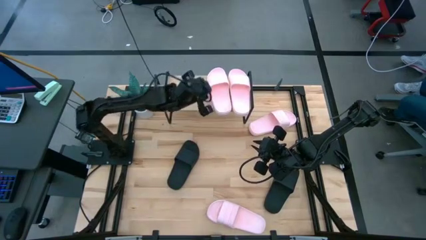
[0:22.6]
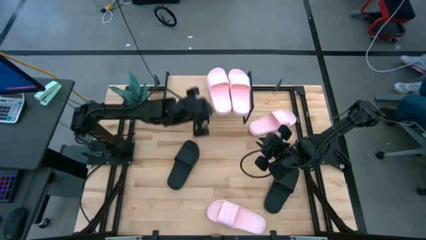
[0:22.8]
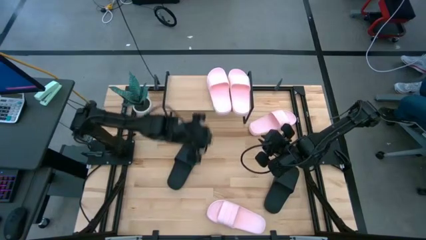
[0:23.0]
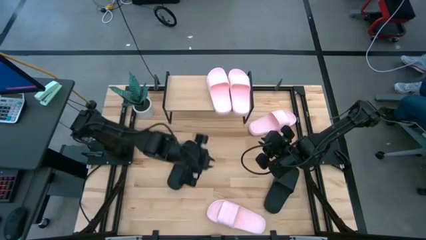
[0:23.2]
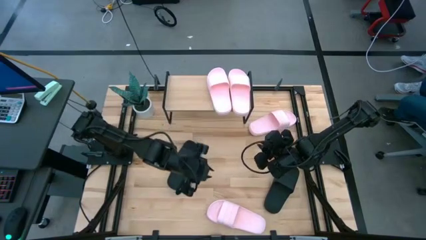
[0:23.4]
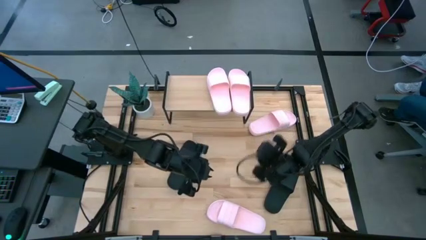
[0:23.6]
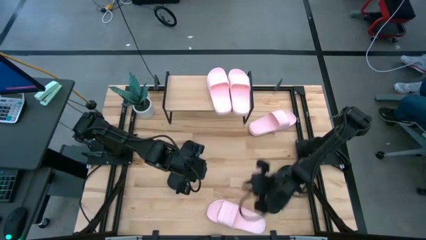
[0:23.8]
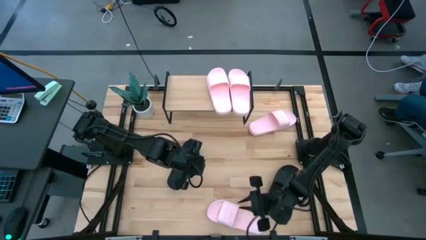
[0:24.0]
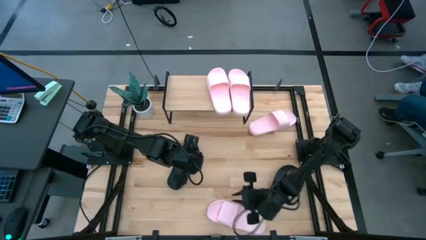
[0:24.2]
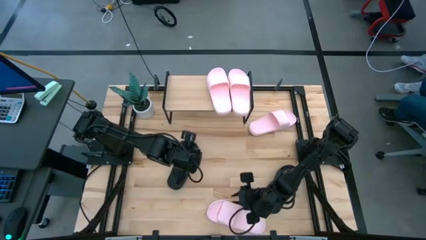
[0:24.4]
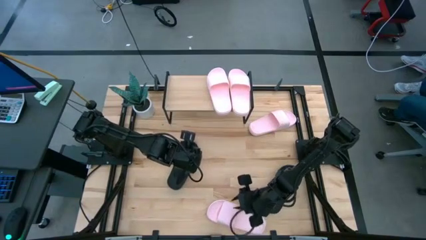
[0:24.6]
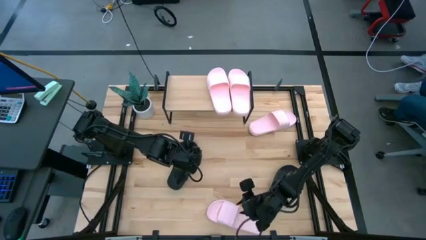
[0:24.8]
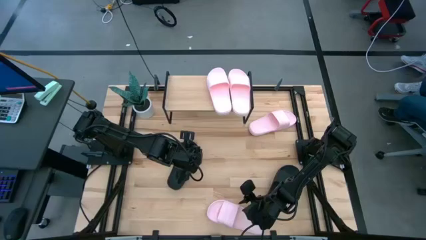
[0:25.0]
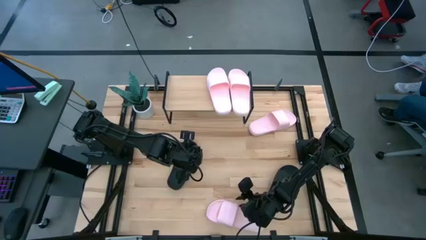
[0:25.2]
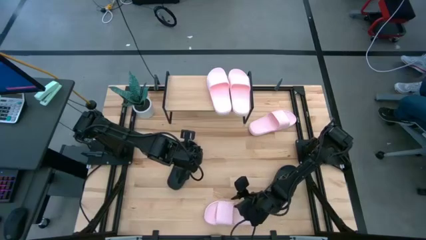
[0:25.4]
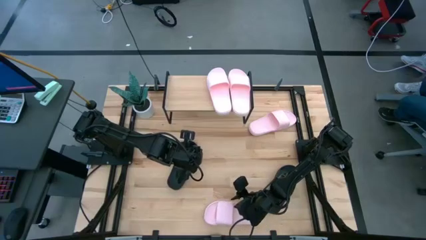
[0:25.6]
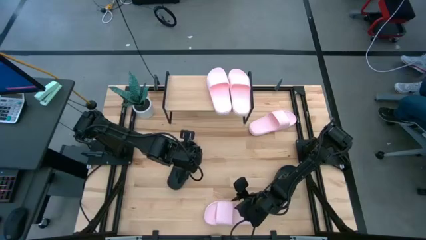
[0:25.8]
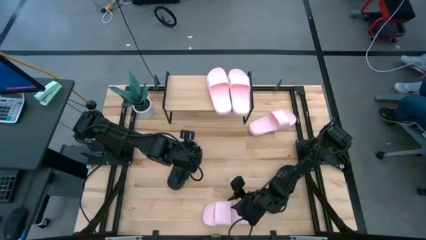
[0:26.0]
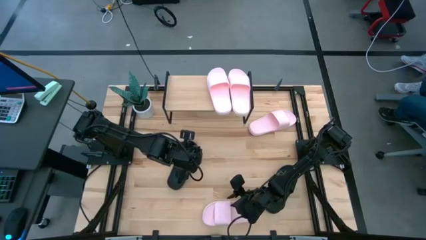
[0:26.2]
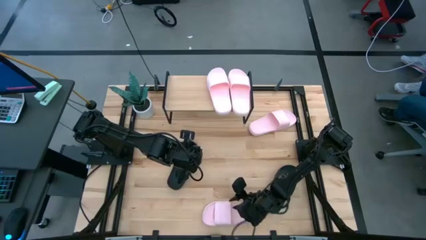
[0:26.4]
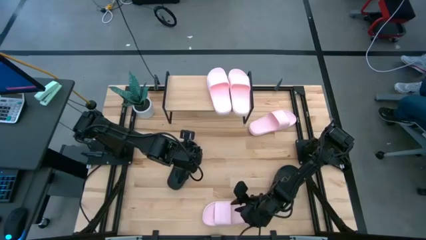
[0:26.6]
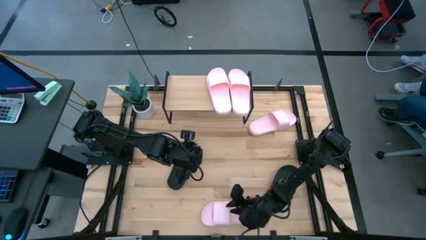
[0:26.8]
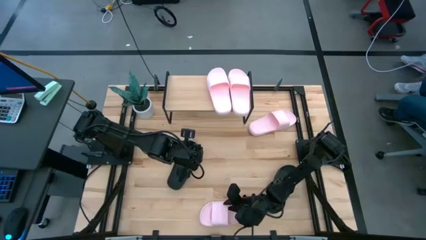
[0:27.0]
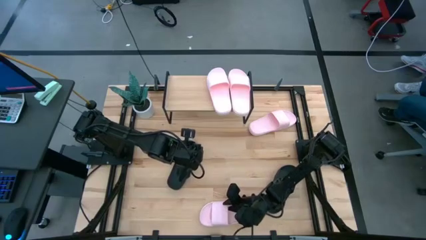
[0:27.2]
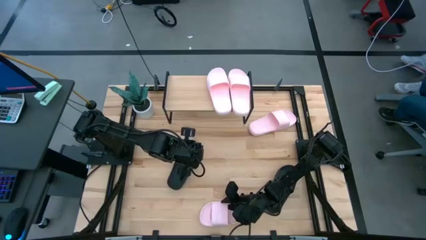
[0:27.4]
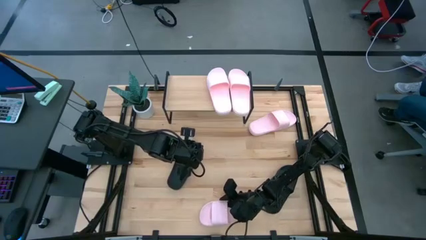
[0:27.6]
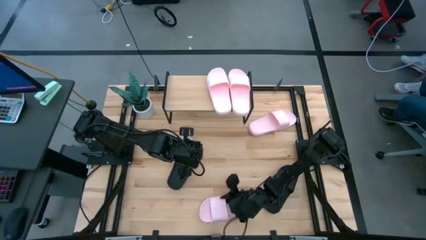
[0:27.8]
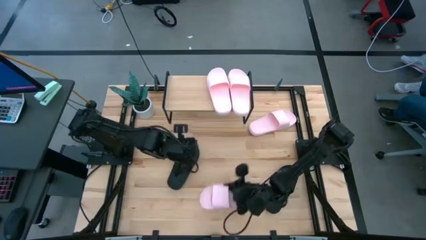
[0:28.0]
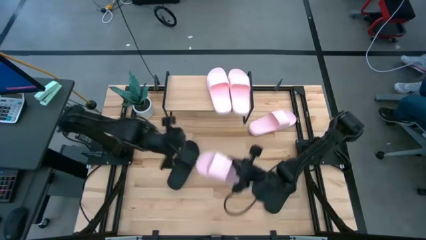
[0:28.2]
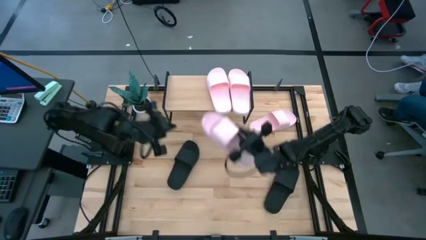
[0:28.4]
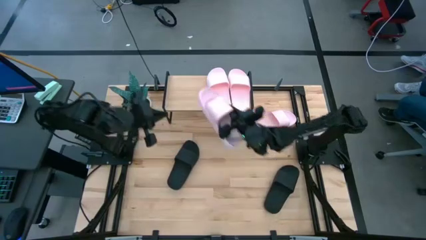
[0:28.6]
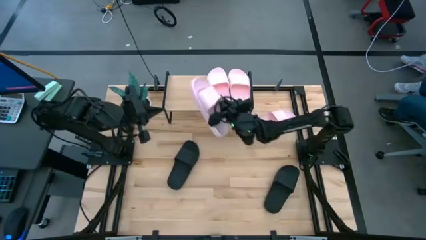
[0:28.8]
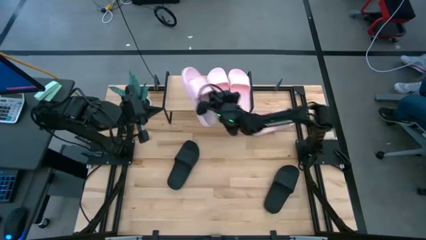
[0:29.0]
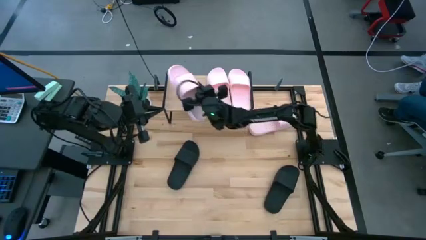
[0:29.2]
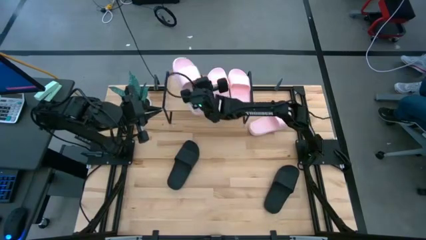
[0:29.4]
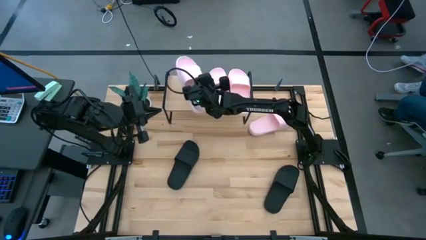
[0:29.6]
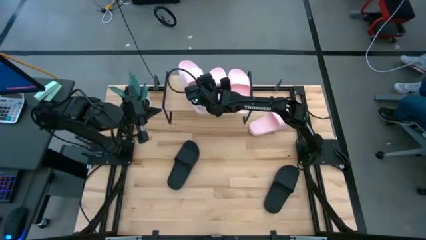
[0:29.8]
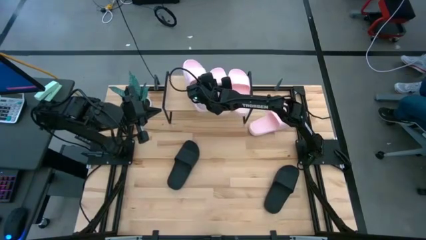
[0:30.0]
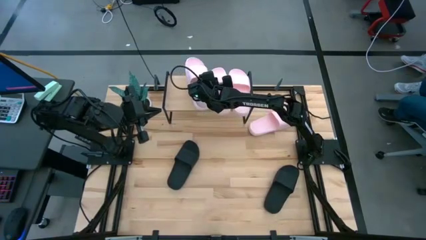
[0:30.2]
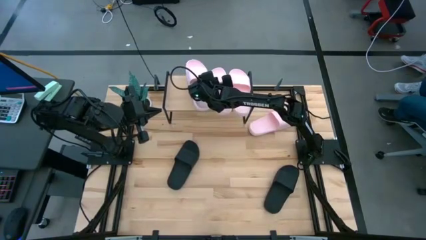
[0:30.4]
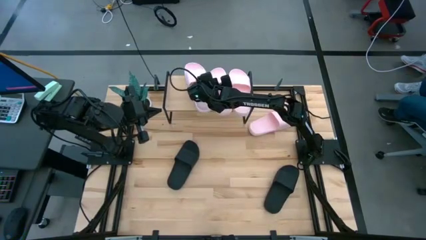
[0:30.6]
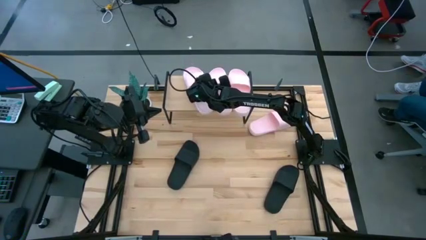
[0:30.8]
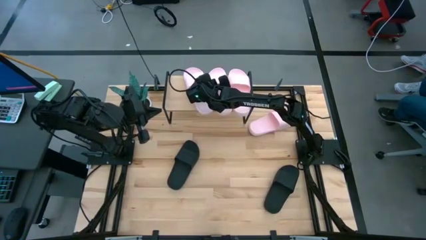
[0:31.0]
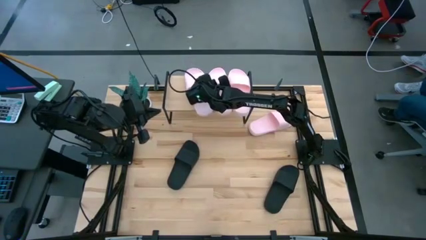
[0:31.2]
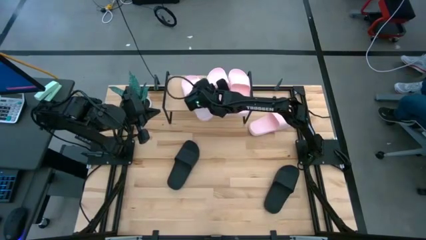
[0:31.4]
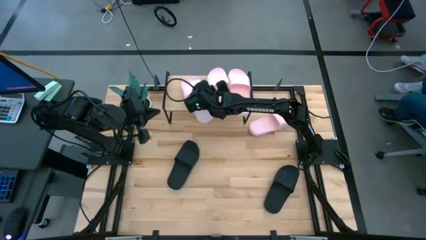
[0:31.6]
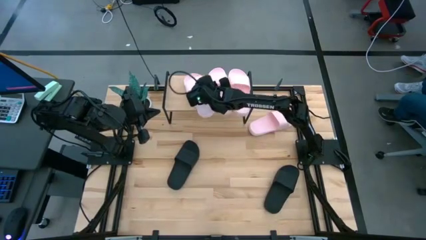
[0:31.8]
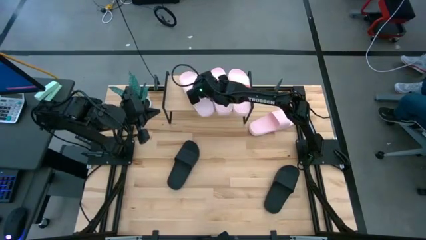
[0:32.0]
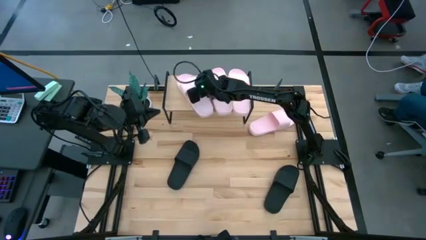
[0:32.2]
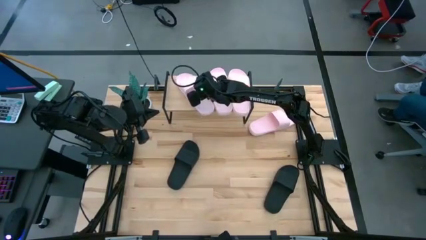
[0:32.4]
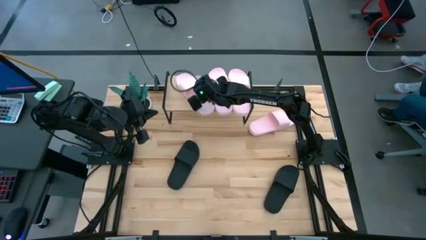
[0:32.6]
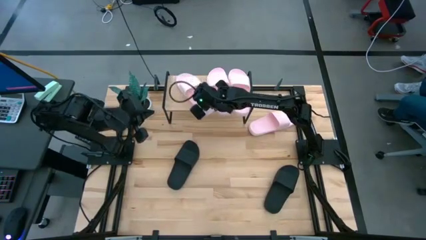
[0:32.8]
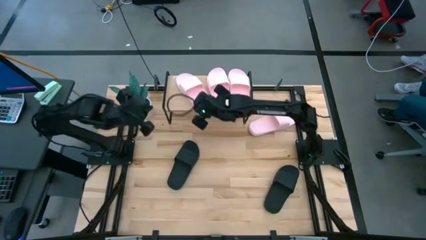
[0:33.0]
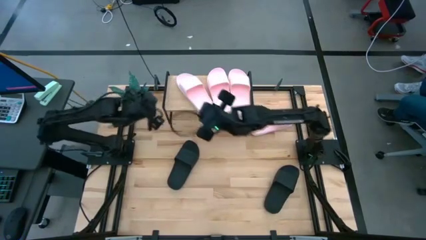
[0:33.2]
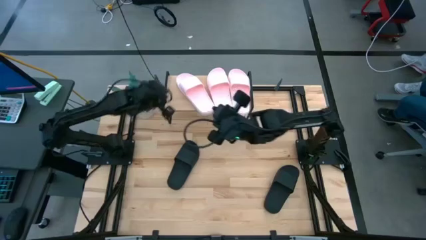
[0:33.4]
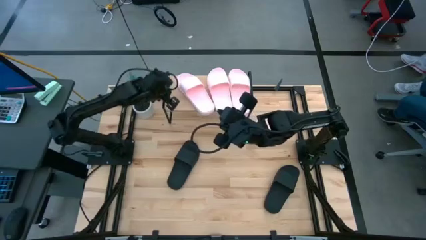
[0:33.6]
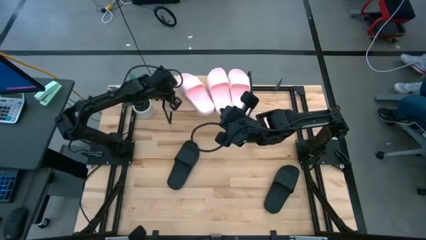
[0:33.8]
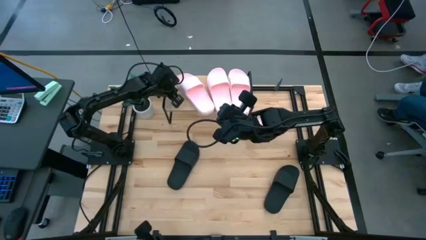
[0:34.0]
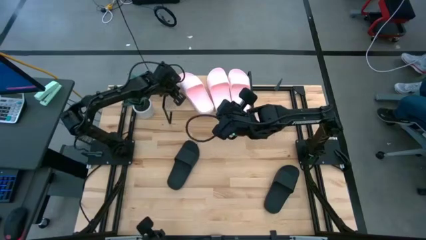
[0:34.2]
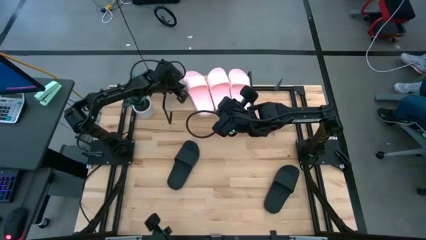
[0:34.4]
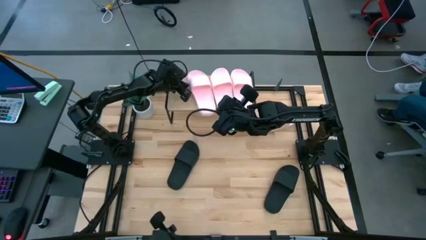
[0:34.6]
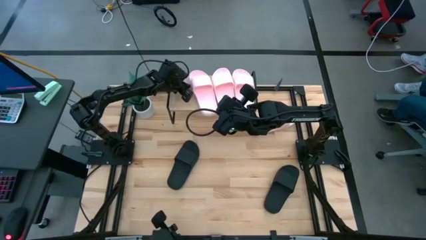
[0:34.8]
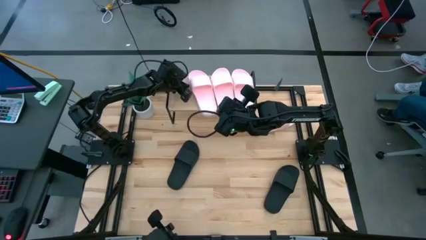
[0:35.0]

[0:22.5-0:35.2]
Task: Pick and place slides into the shelf
Put the bottom pink slides on the shelf

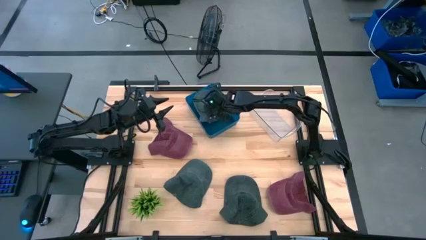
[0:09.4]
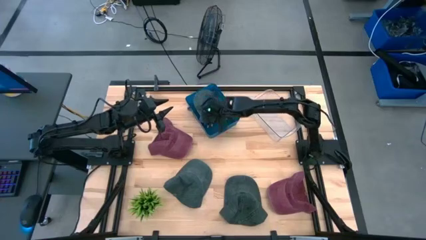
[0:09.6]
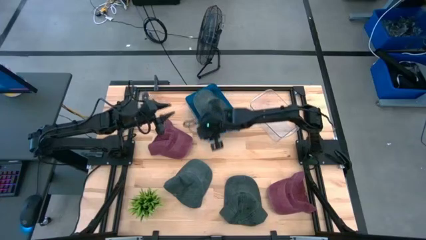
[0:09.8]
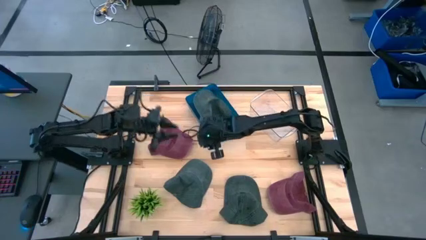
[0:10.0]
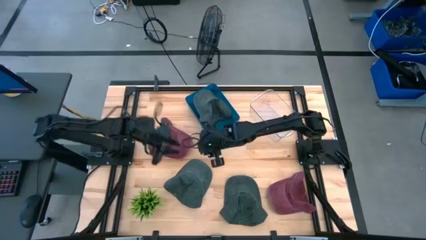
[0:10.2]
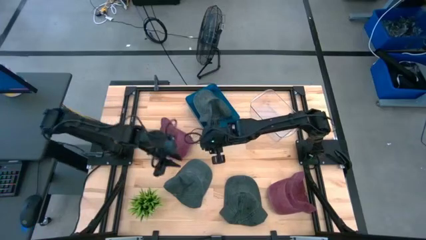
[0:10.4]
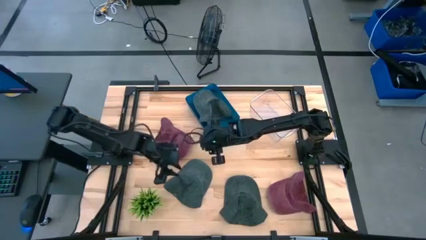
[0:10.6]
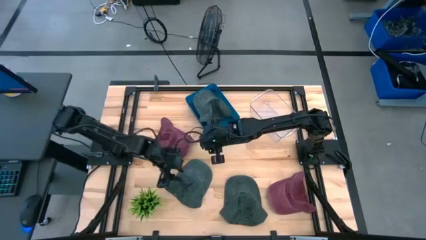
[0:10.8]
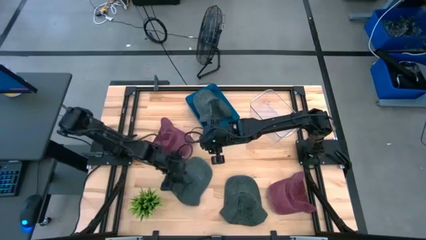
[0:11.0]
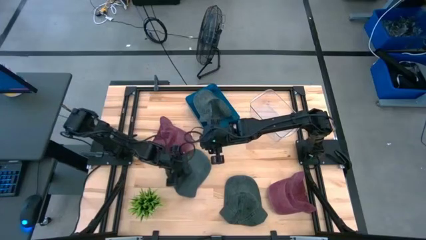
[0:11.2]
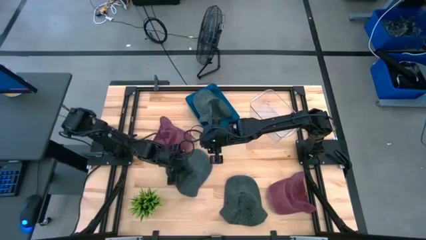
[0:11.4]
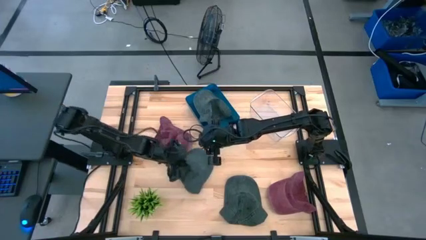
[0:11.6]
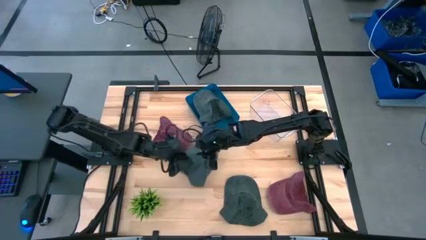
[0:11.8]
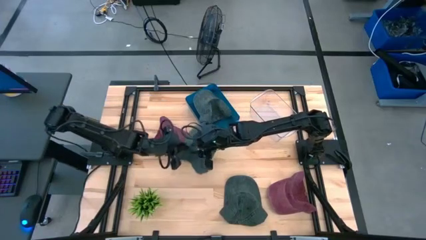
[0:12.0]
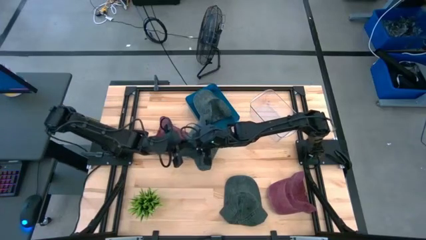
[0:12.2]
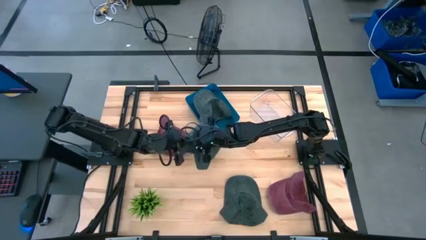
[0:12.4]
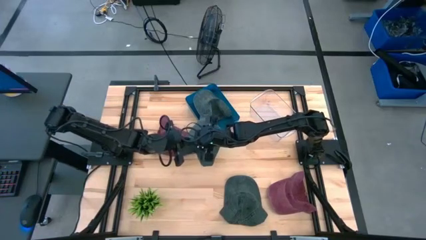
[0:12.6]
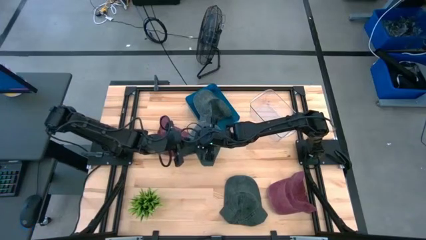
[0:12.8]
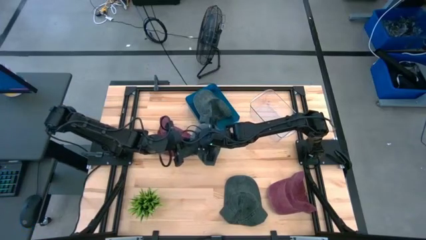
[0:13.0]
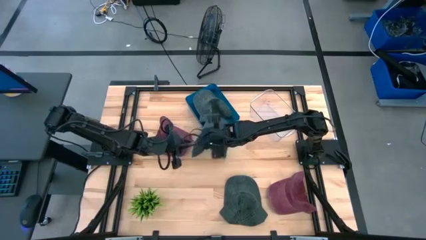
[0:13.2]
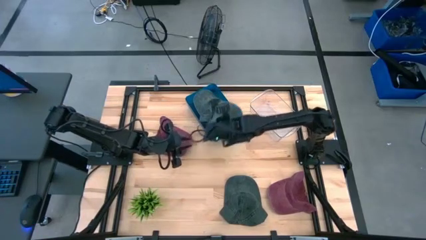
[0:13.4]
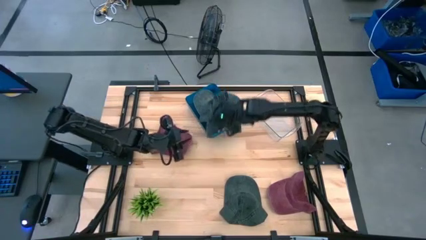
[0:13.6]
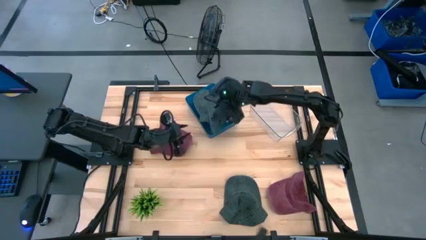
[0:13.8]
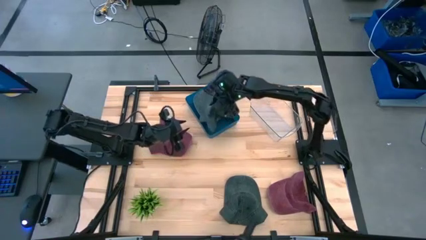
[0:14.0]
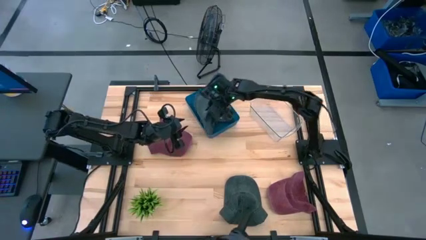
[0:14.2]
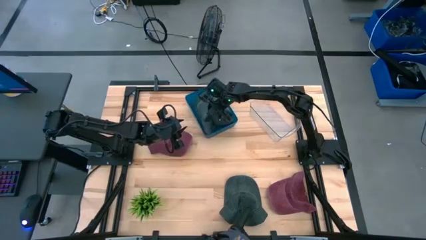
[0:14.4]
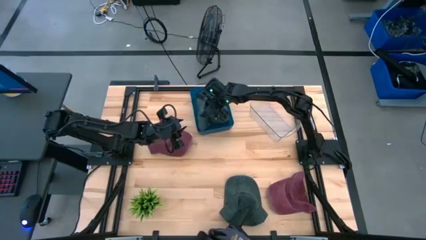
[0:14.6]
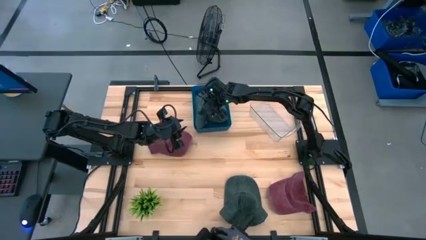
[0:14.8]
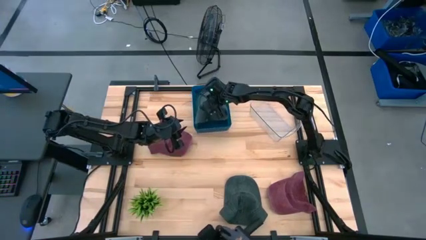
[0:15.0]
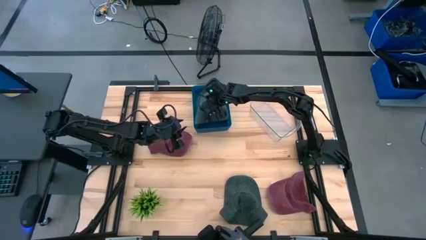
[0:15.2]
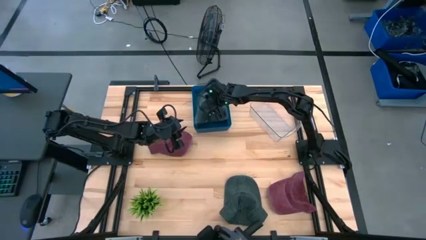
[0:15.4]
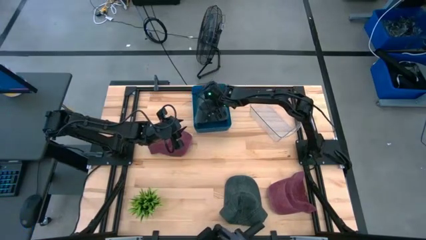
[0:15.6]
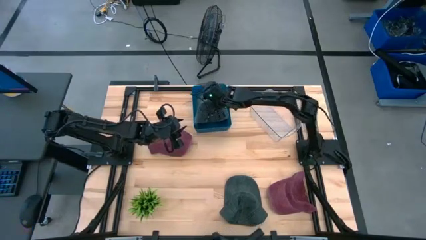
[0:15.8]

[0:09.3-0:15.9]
Task: Pick & Place hat
Put the left gray cap into the blue bin
